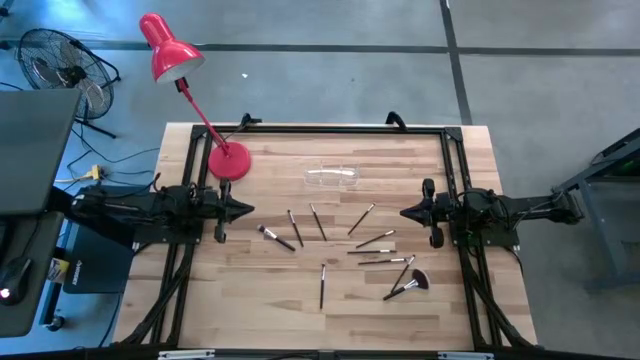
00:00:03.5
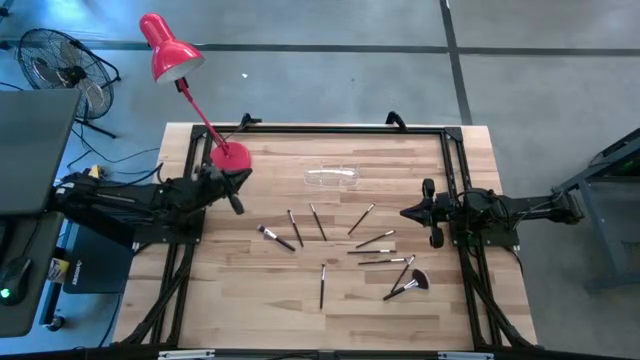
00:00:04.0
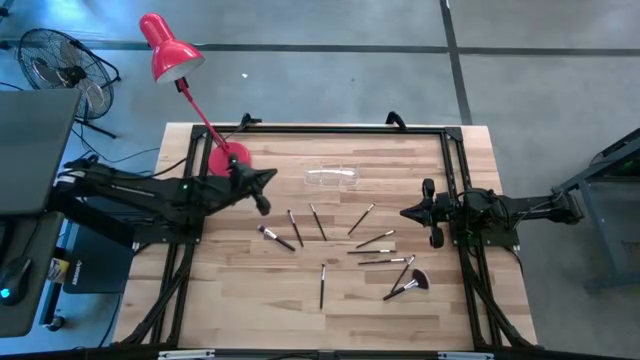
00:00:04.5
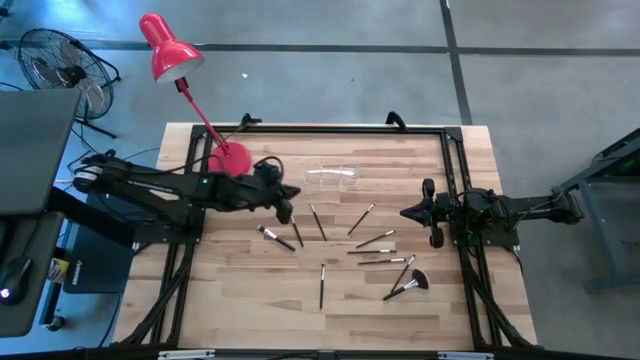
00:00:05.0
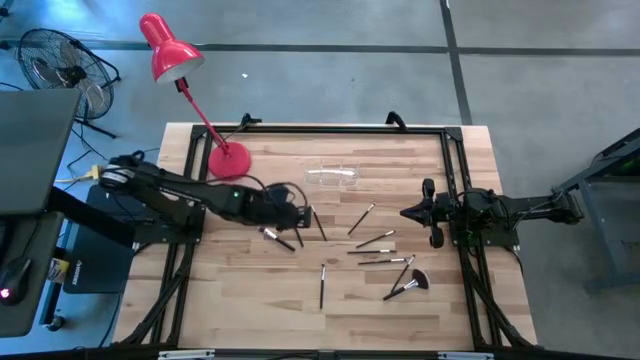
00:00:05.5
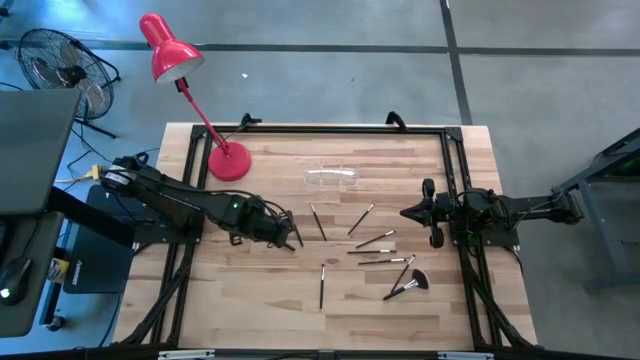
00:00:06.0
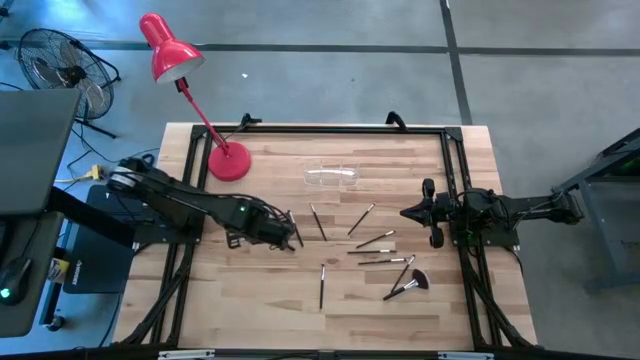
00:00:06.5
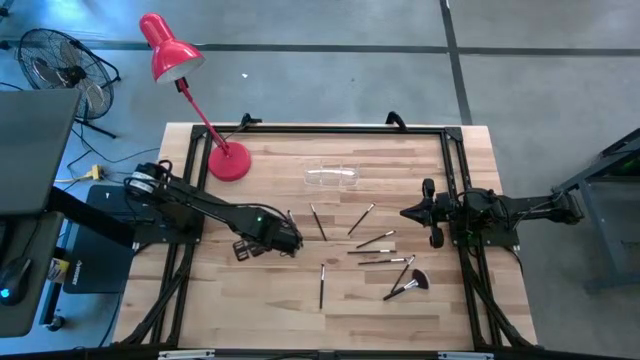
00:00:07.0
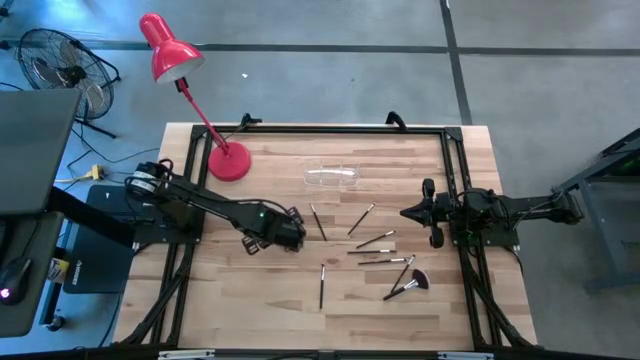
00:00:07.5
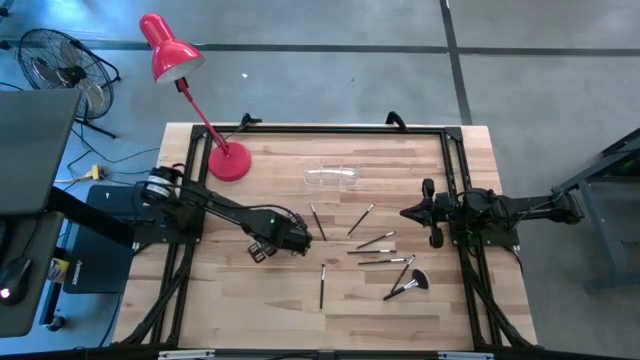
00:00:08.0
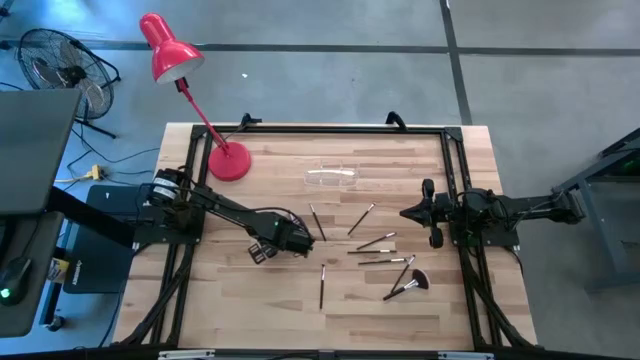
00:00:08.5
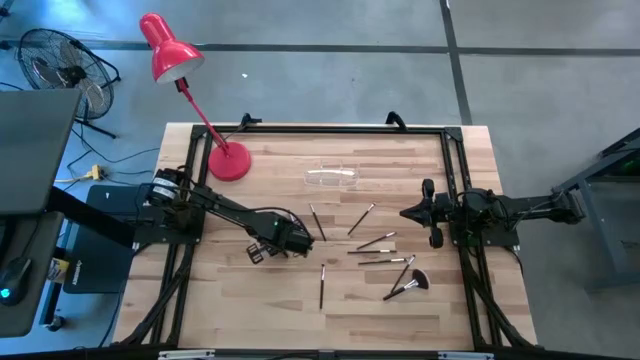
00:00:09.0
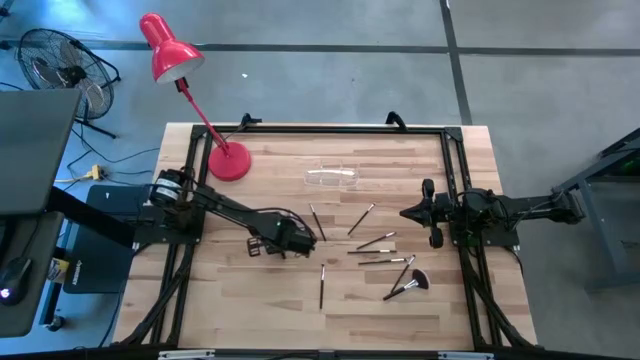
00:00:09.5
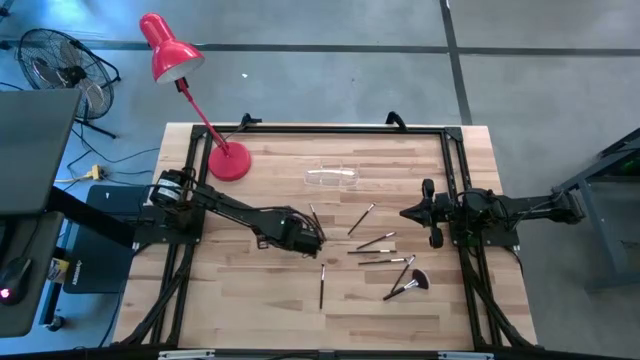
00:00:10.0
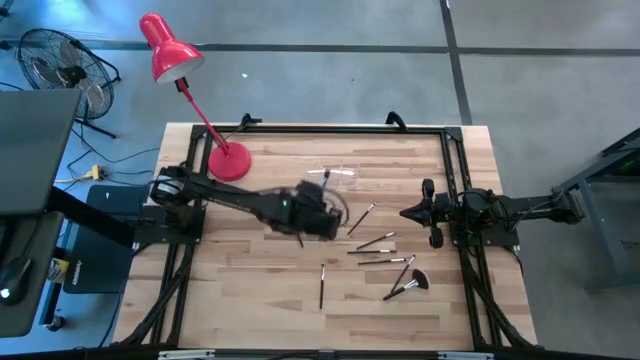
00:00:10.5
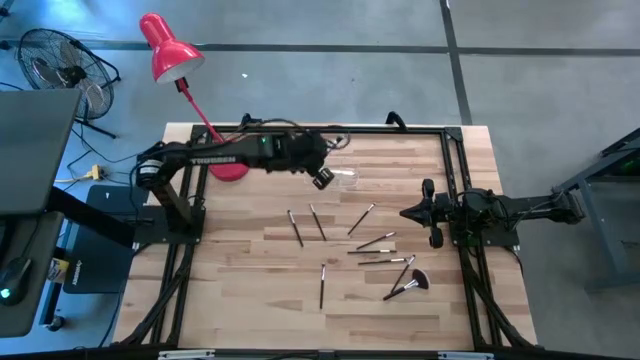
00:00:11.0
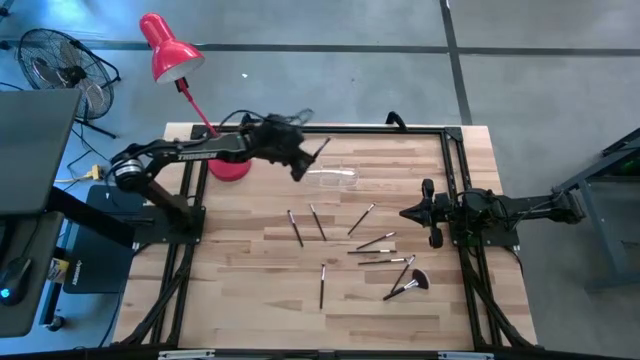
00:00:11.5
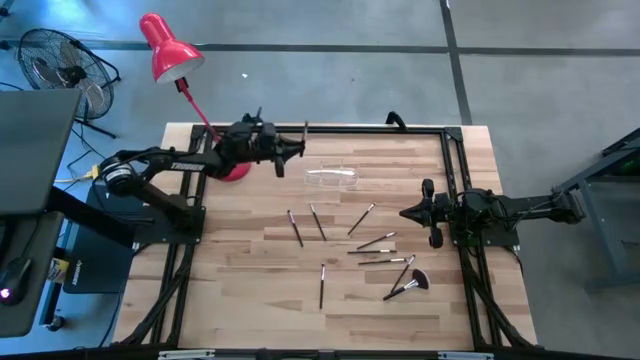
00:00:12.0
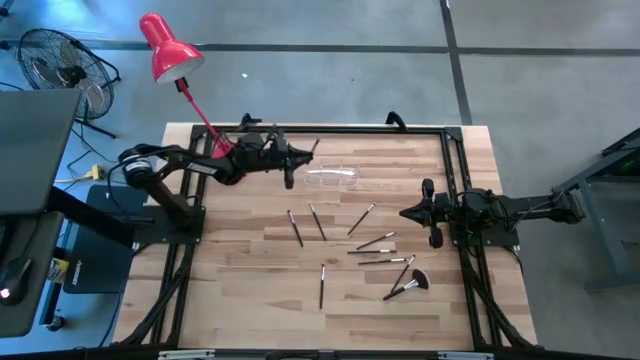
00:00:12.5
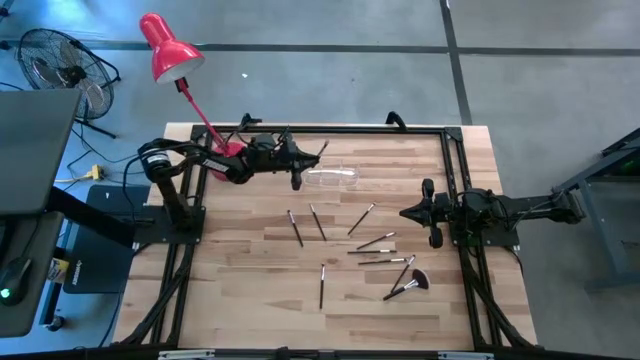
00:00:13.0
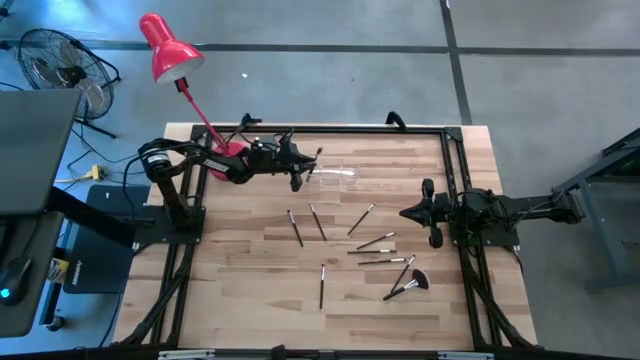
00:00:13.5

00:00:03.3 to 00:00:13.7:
Task: Put items in baskets/containers
Put the foundation brush into the transparent organizer

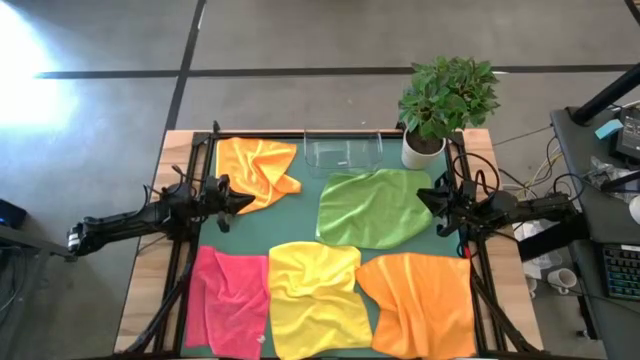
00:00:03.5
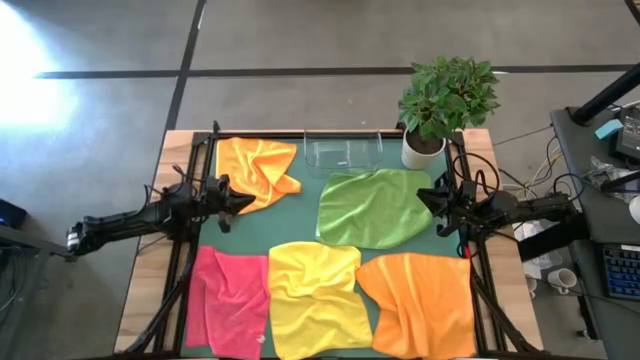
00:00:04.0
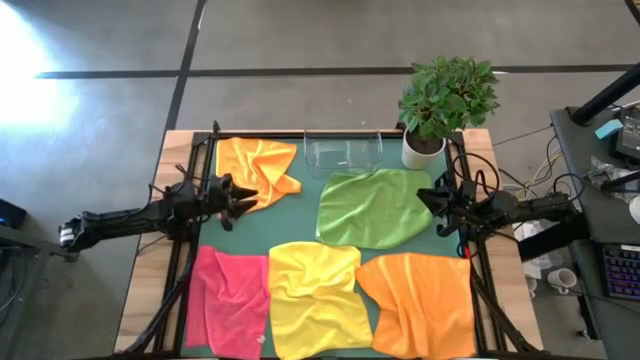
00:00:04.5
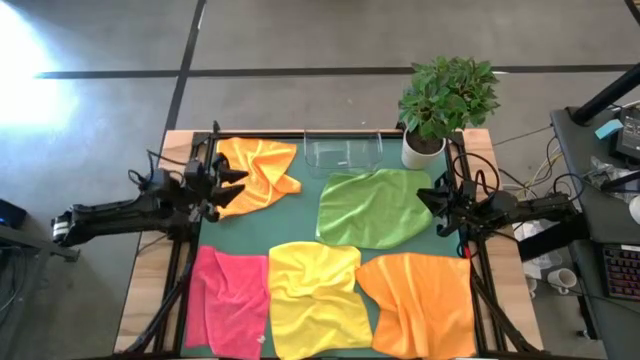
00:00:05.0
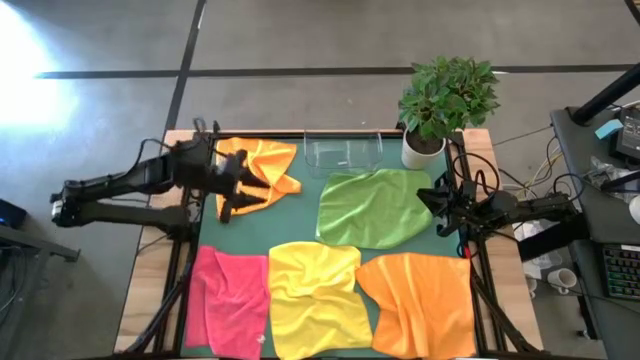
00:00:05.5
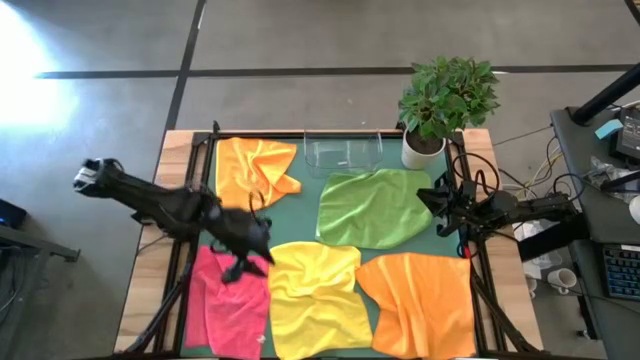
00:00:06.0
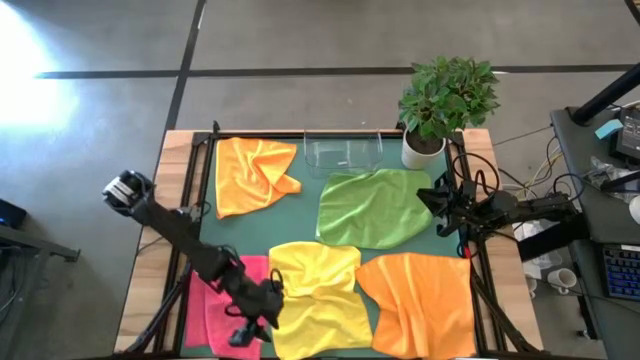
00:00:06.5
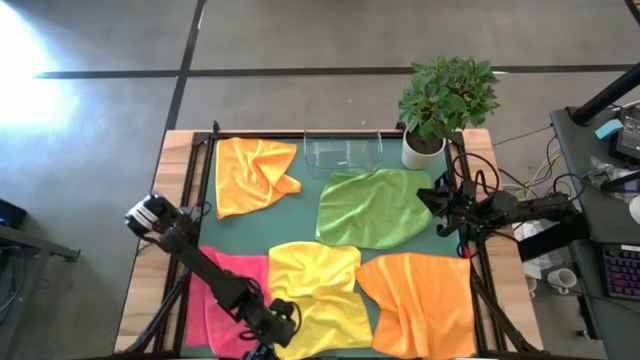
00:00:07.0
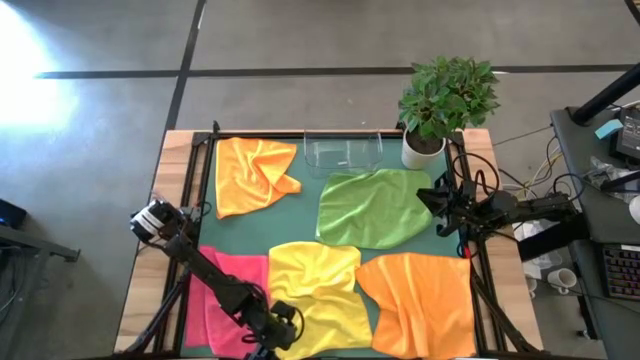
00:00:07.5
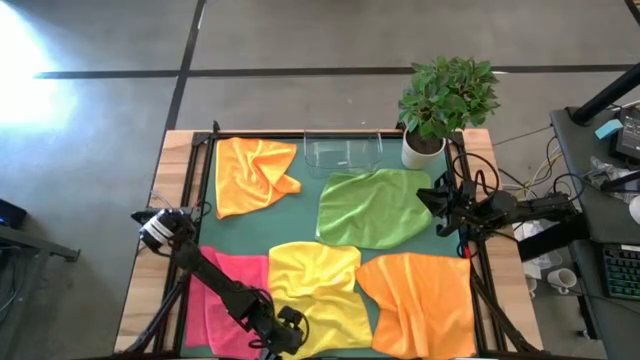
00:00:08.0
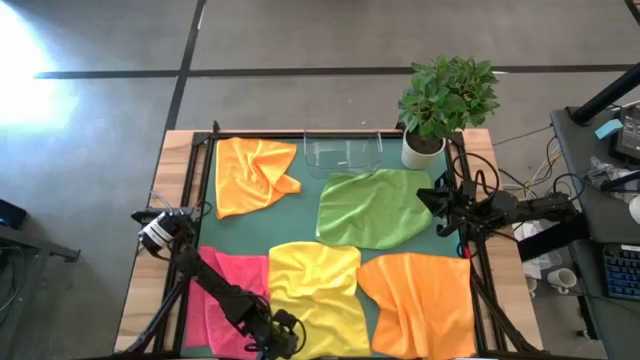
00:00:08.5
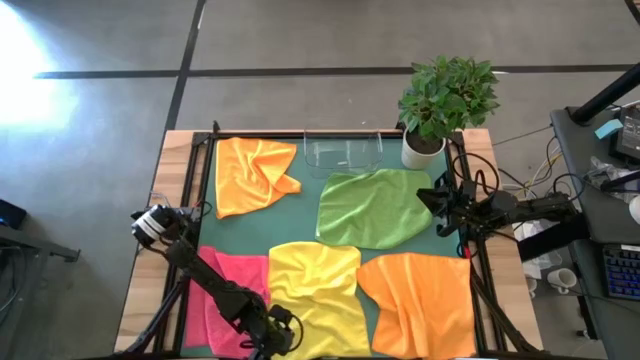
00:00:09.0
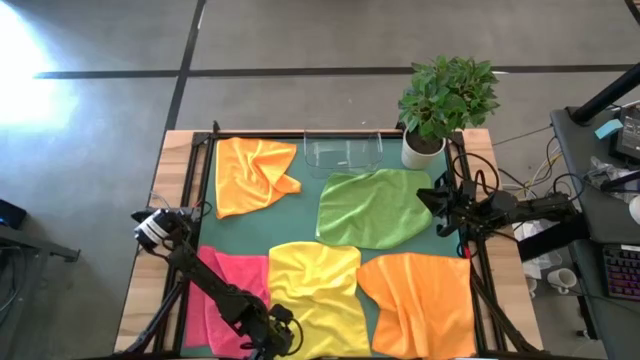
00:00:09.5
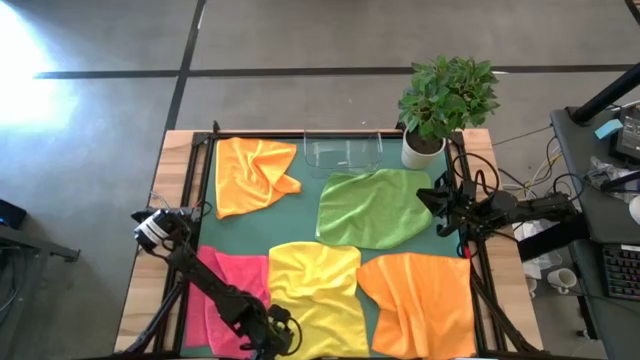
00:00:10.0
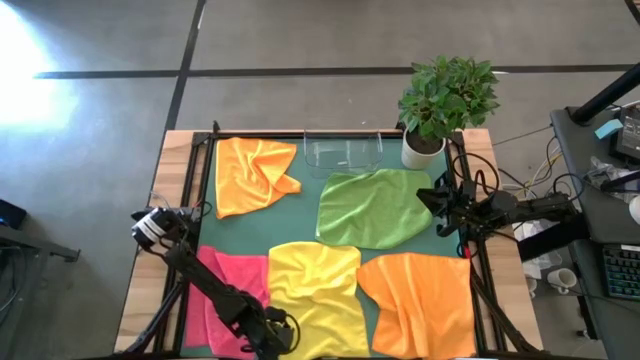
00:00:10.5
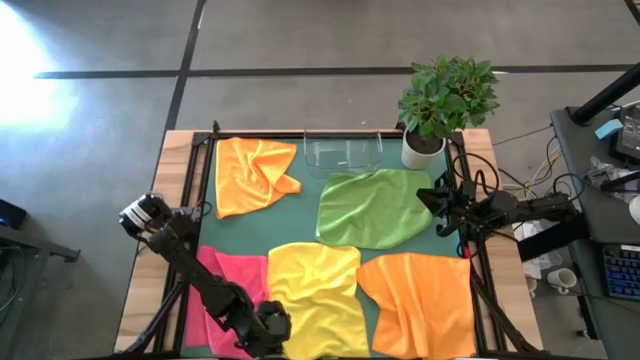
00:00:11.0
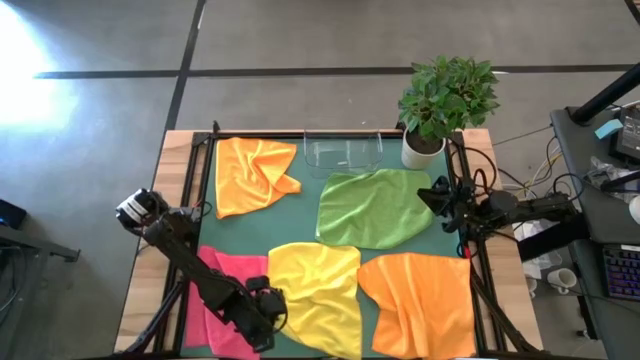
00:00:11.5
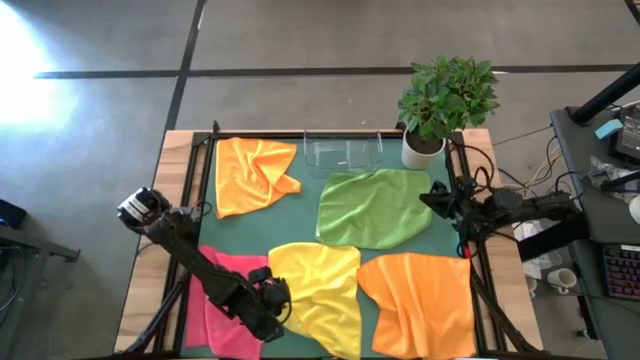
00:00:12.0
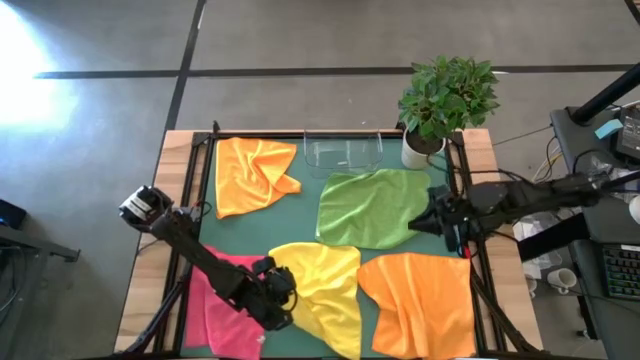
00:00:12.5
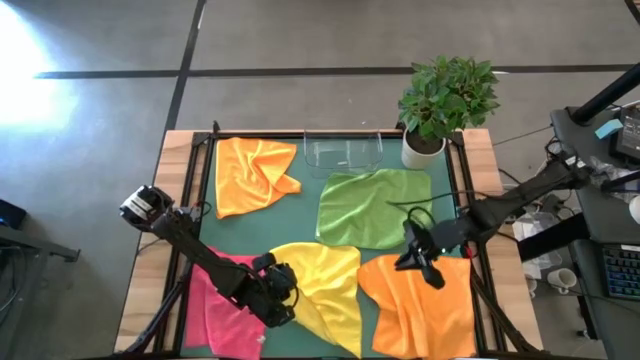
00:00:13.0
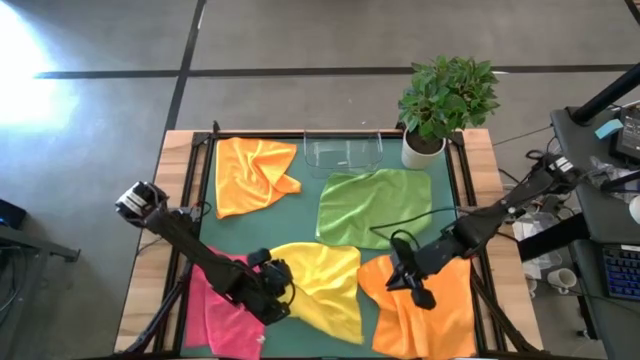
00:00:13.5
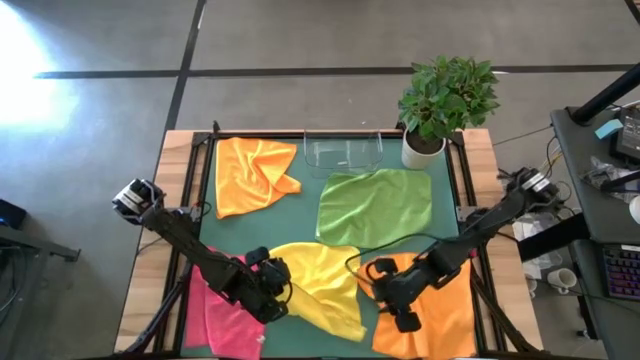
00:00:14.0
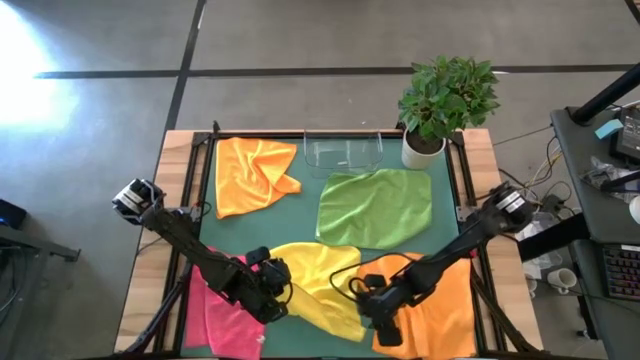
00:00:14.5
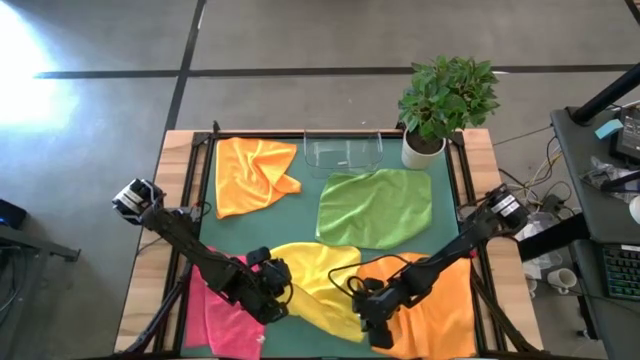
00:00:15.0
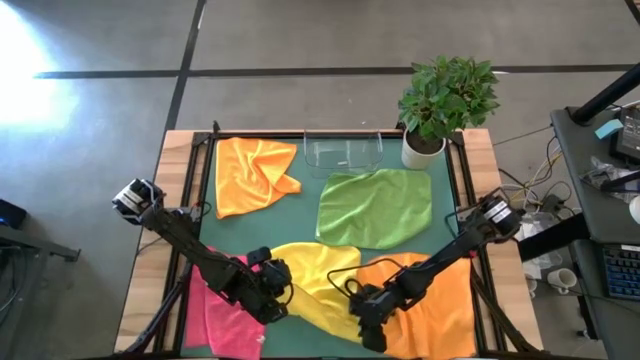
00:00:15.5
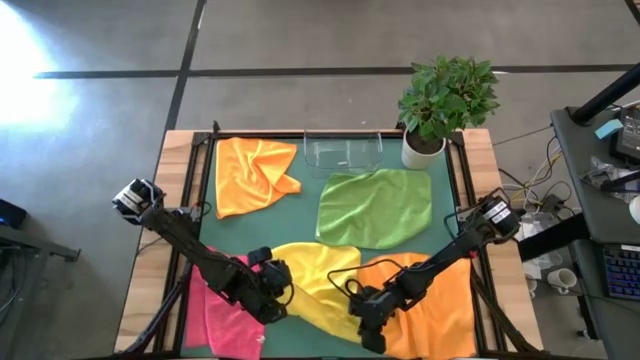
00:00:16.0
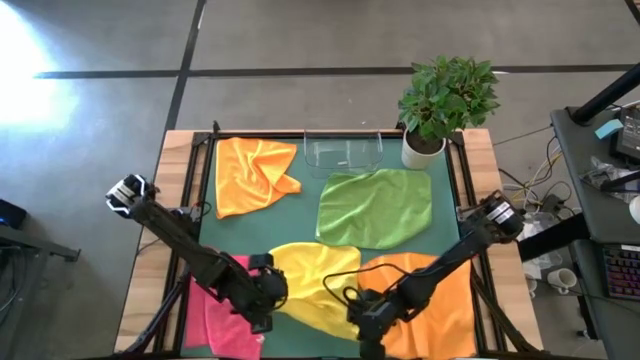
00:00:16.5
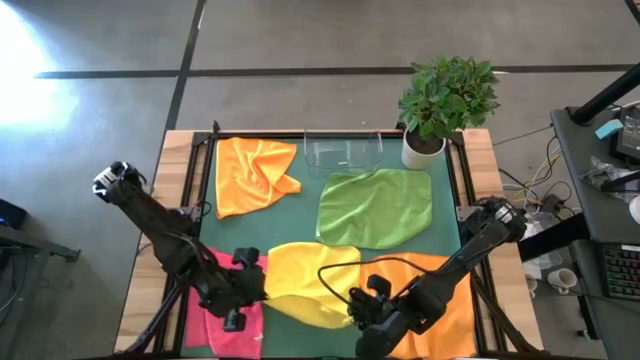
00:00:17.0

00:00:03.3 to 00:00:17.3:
Task: Fold microfiber towels
Fold the yellow towel
